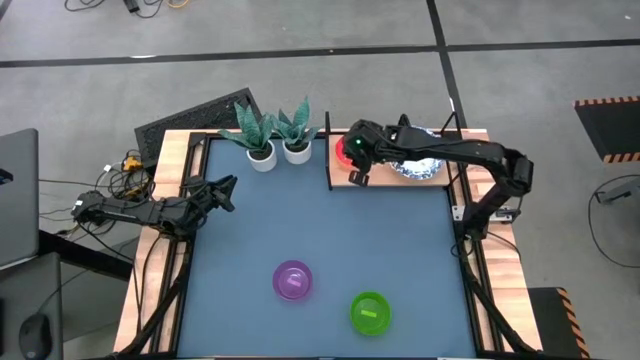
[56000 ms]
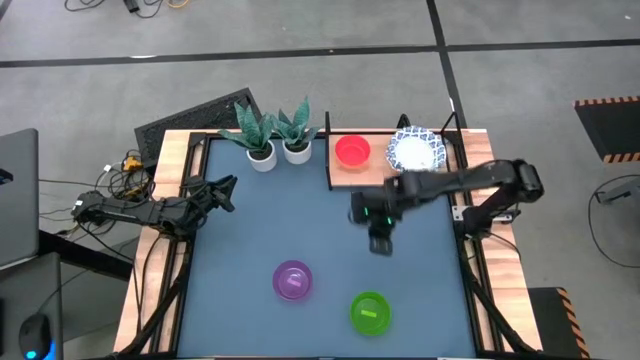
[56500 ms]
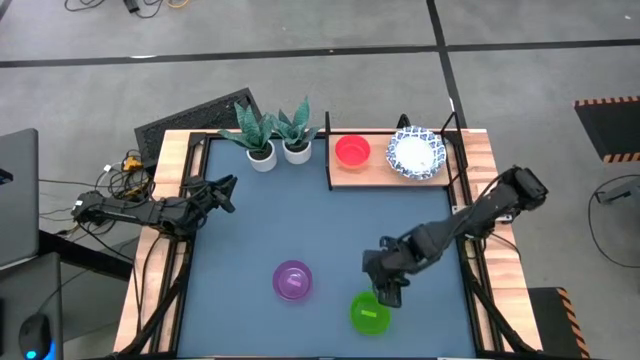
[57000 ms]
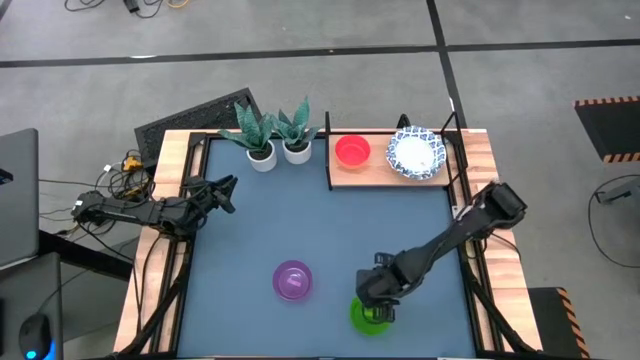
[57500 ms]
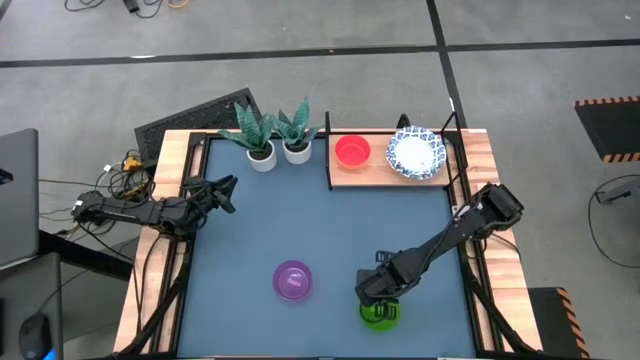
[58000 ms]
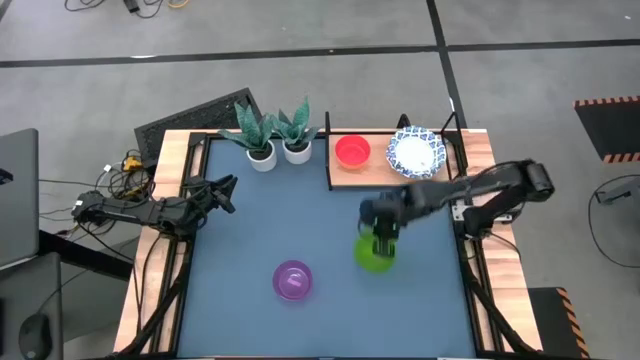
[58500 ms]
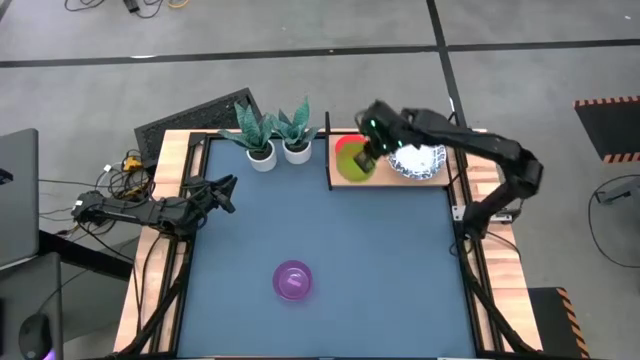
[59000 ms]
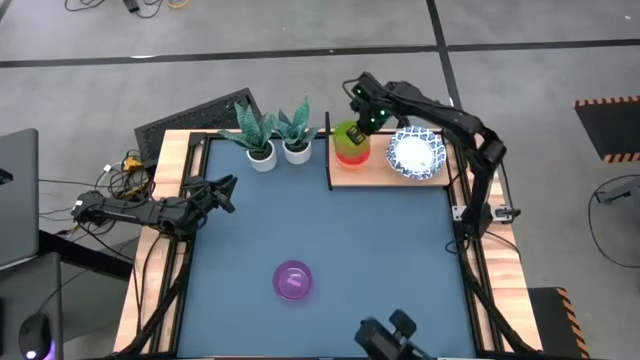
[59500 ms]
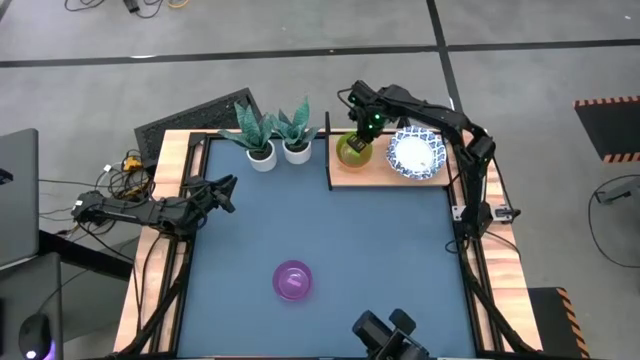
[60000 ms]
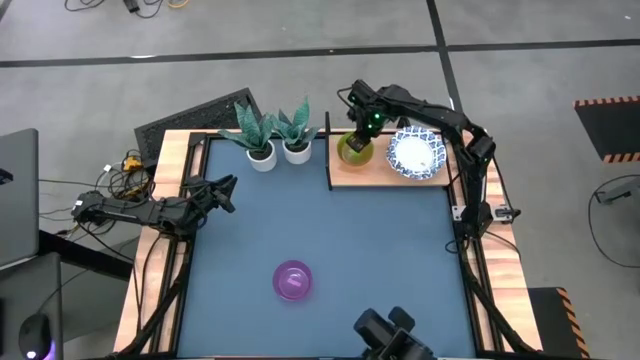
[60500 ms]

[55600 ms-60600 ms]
Task: Place and stack bowls onto a shelf
Stack the green bowl on the red bowl on the shelf

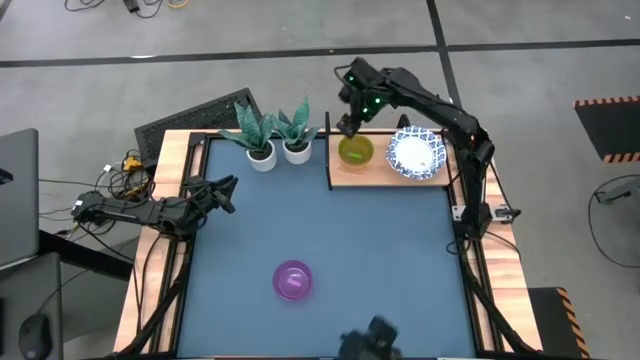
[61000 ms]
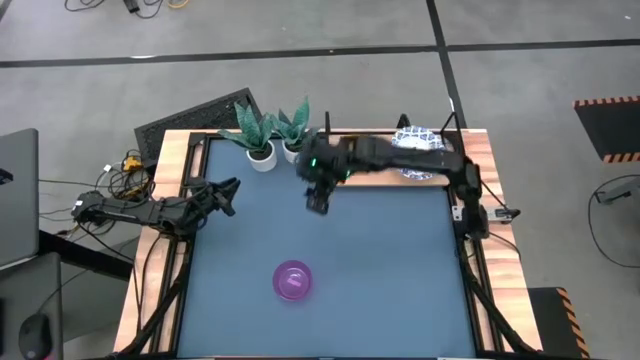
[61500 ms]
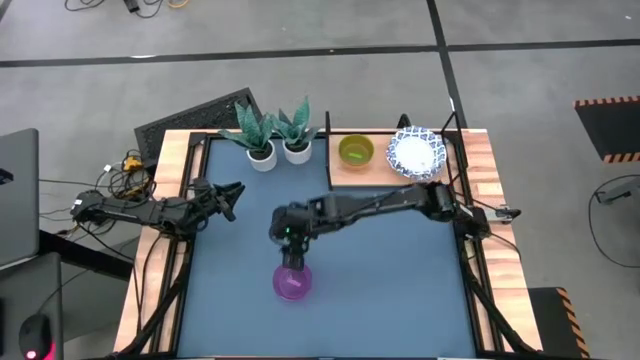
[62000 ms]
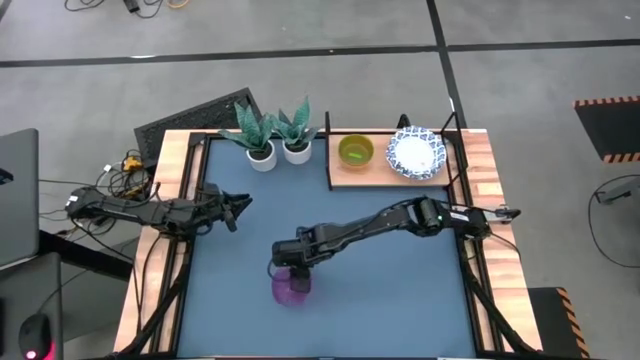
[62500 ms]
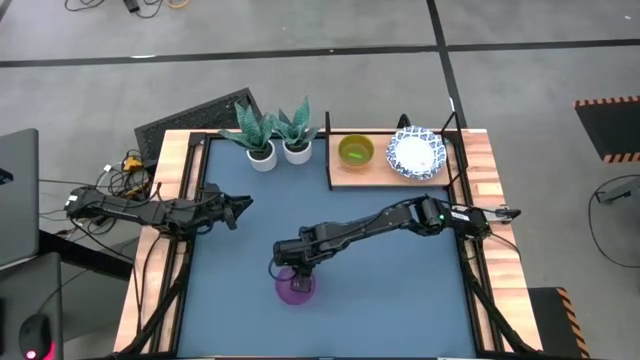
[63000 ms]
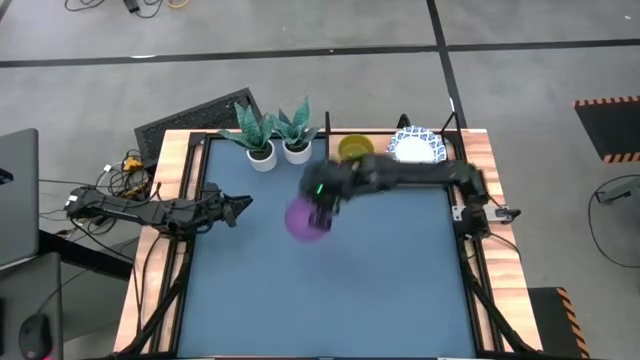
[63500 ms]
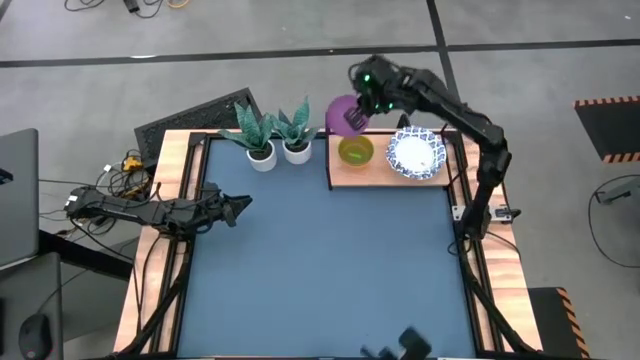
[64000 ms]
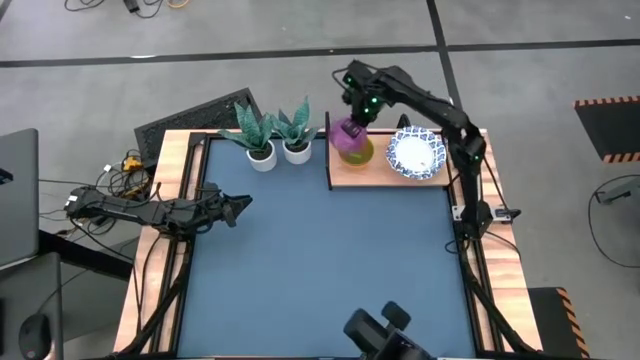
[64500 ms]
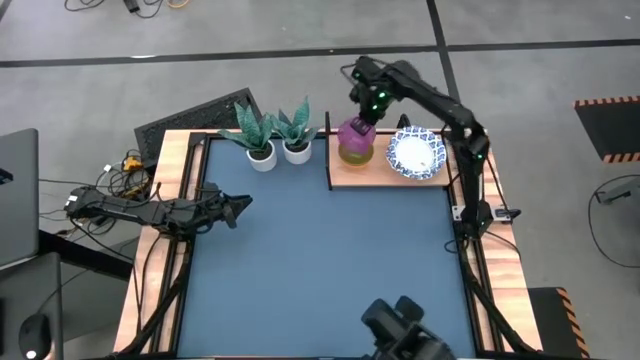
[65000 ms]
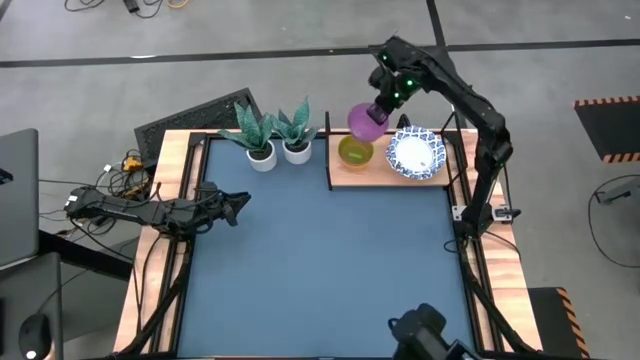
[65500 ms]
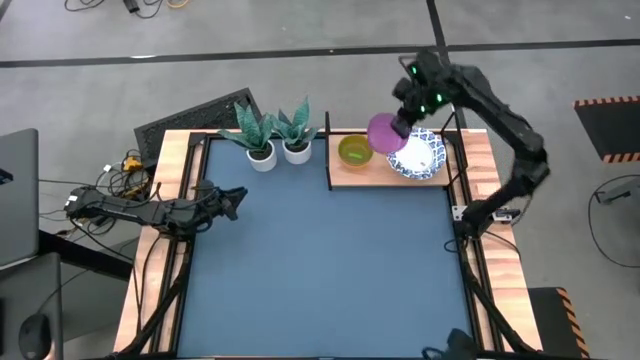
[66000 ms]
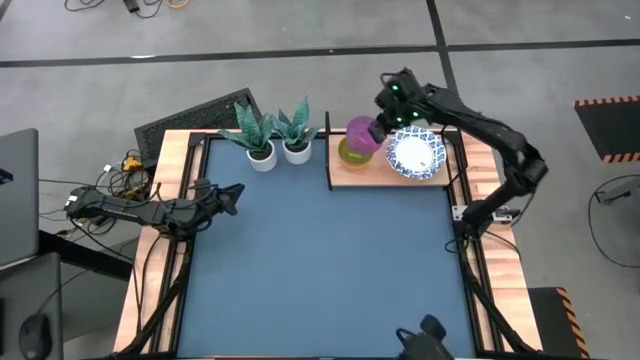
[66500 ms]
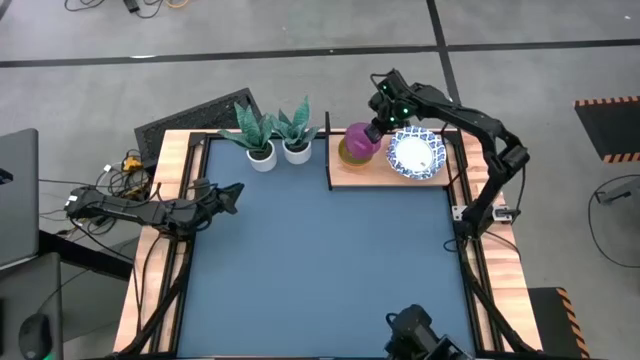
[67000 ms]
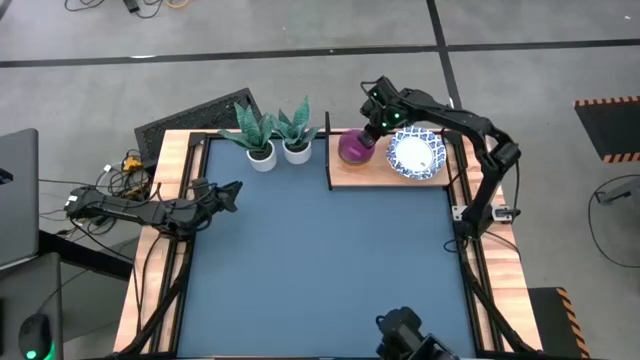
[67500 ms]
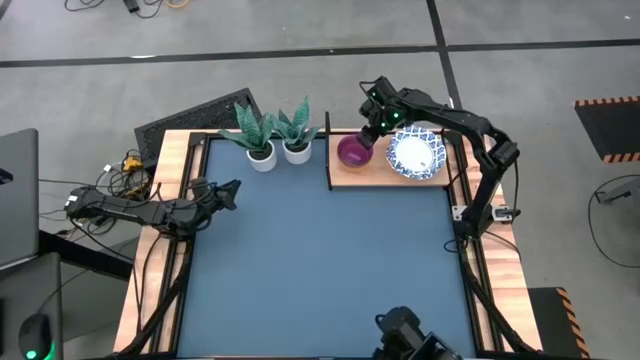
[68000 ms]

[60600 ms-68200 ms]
Stack the violet bowl on the green bowl on the shelf

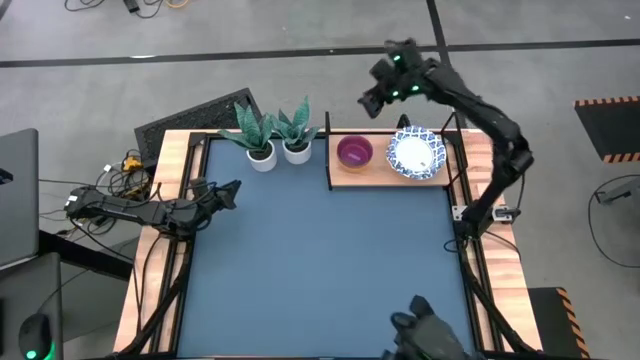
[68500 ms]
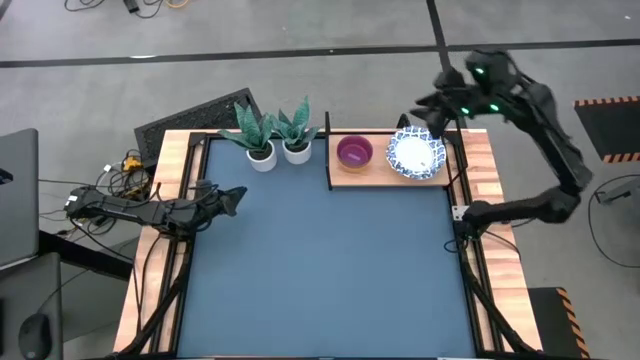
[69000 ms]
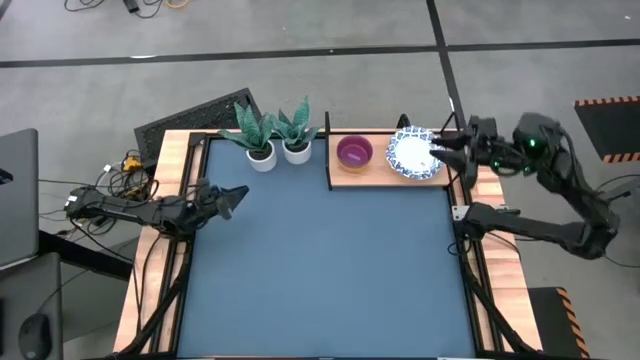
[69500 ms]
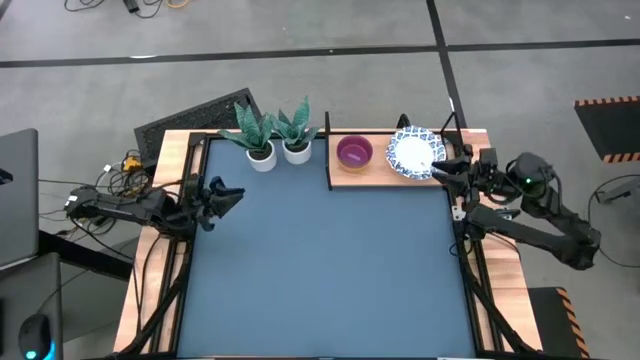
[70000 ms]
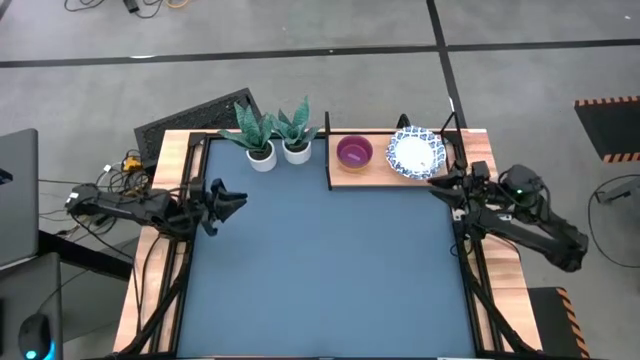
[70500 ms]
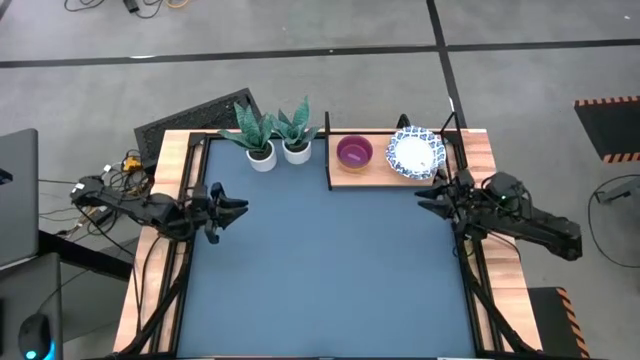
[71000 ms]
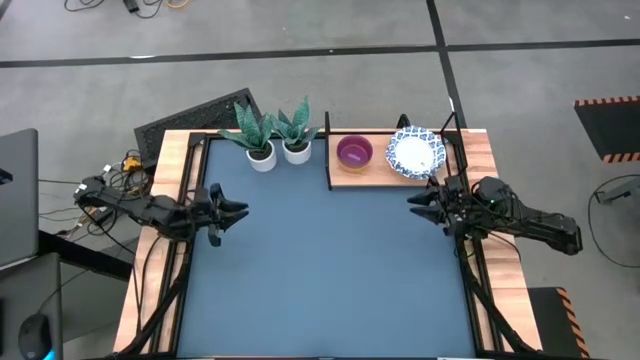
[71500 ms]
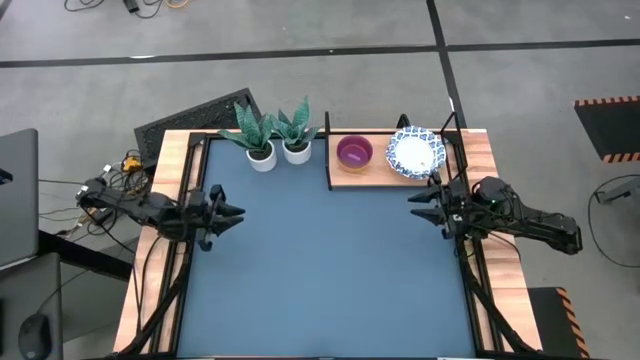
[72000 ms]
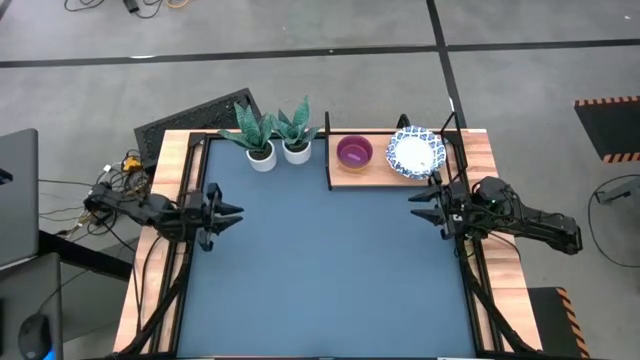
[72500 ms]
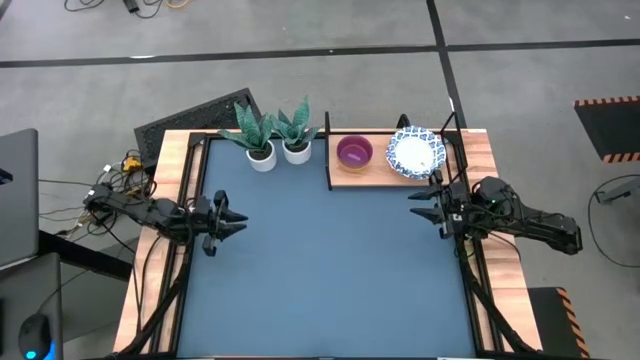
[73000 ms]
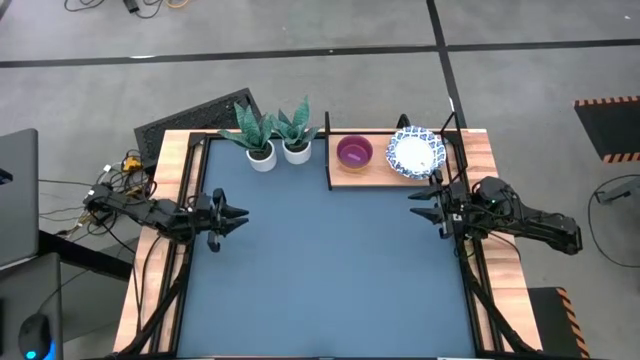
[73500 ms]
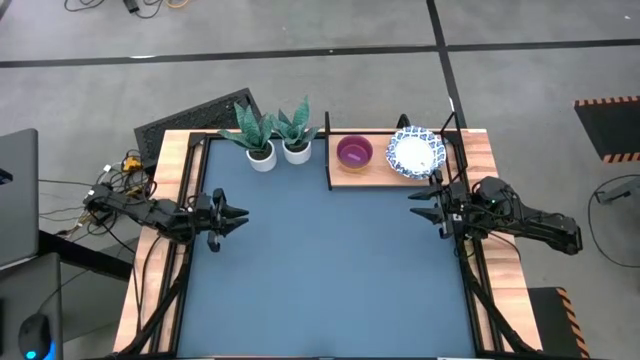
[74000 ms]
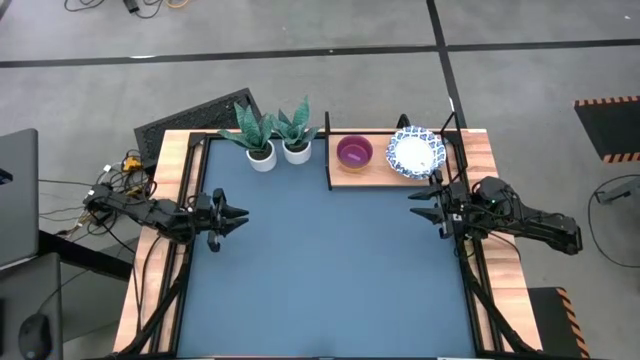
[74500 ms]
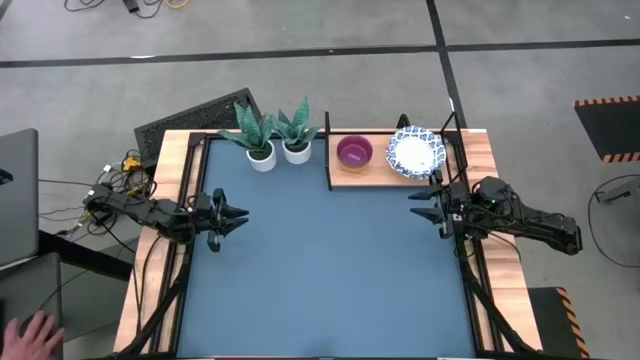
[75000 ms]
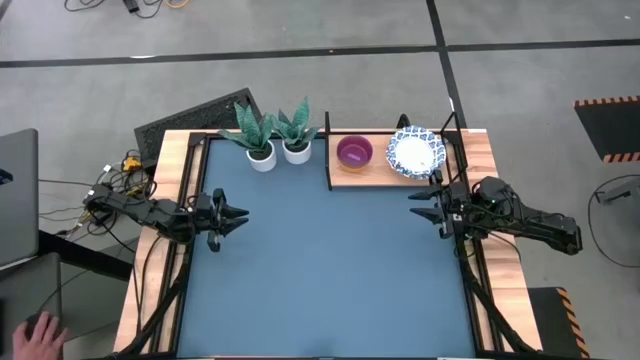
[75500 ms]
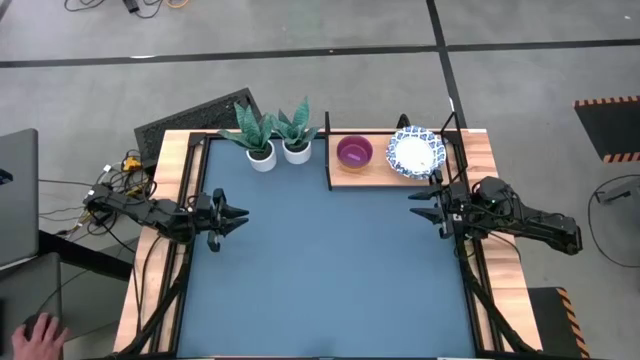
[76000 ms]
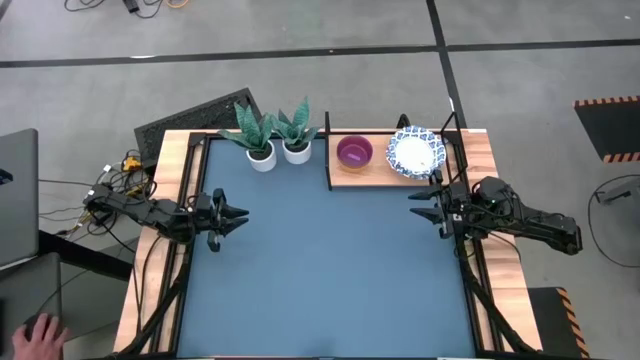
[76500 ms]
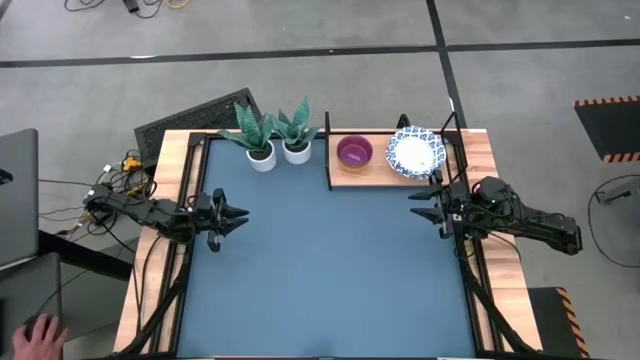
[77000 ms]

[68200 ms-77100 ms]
Return to Home Position
